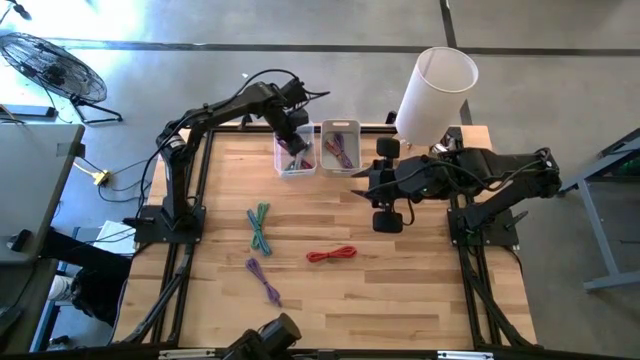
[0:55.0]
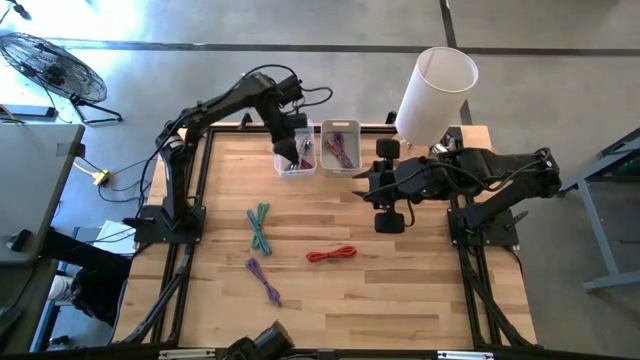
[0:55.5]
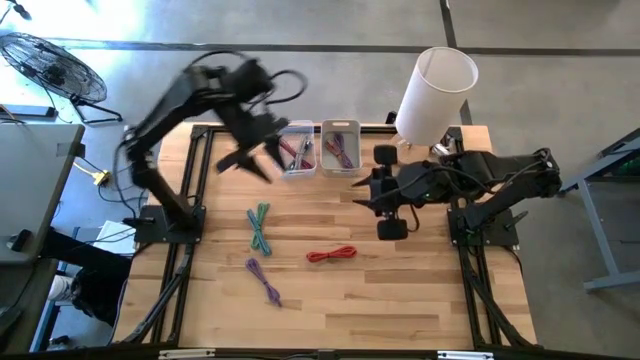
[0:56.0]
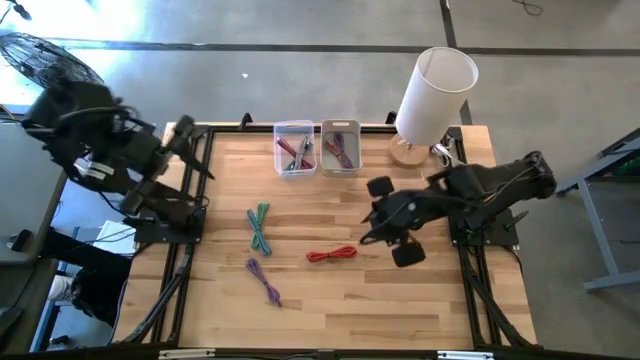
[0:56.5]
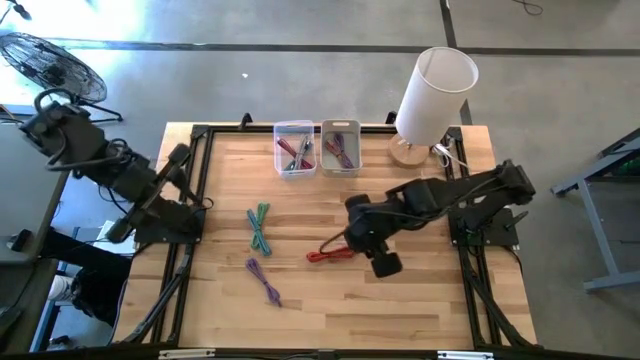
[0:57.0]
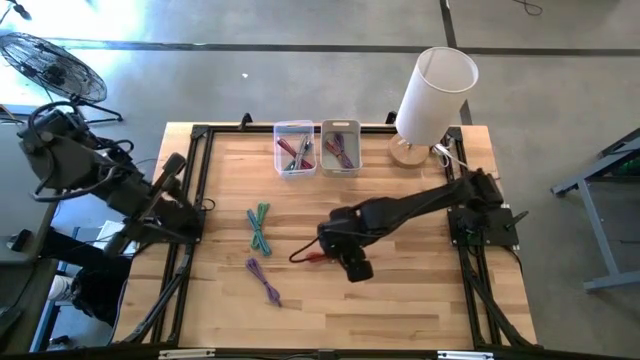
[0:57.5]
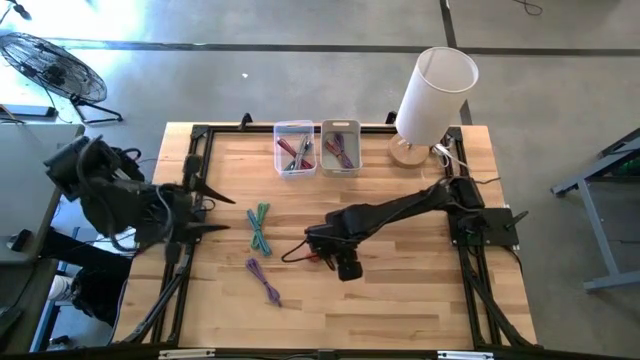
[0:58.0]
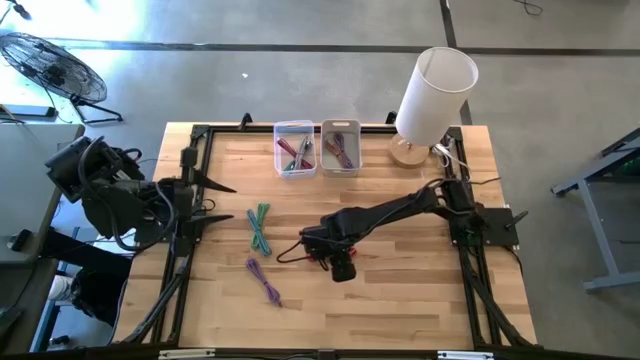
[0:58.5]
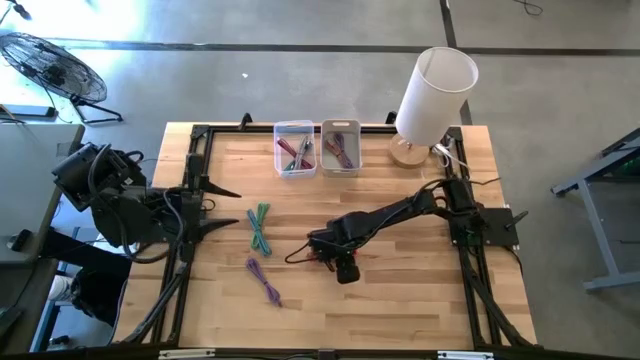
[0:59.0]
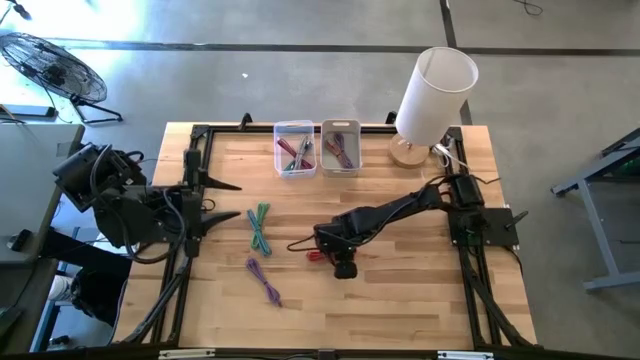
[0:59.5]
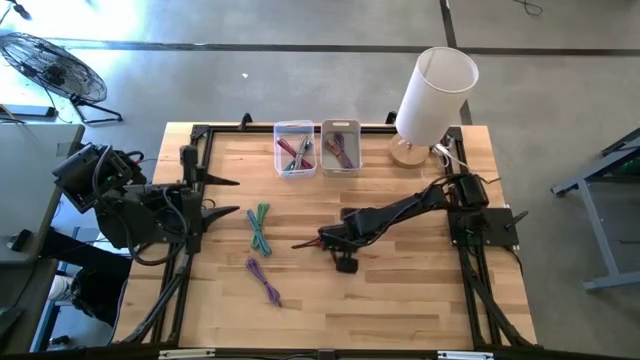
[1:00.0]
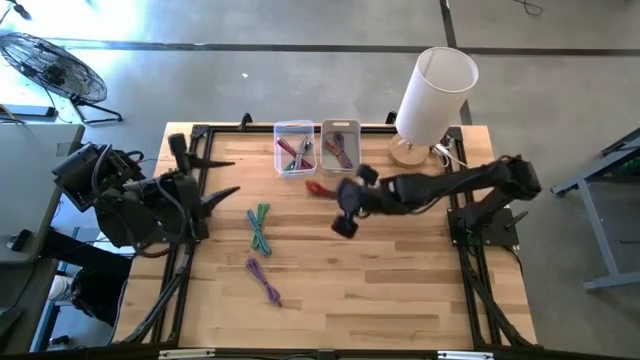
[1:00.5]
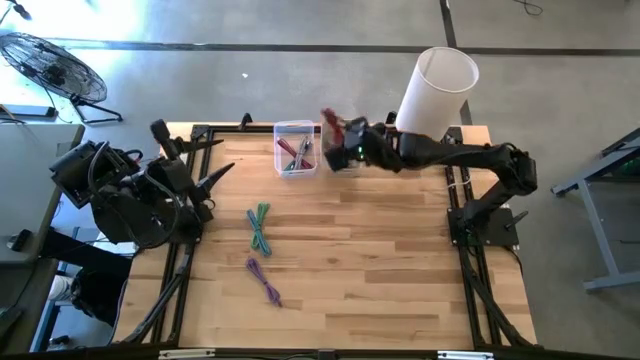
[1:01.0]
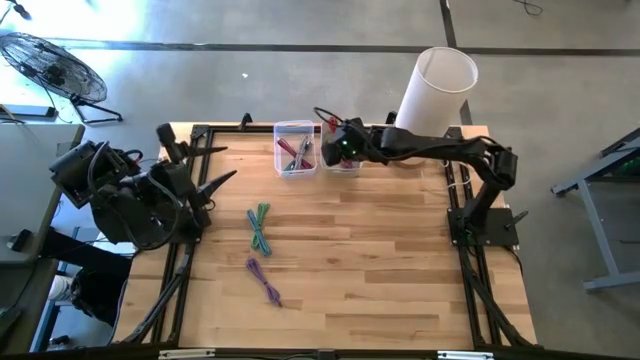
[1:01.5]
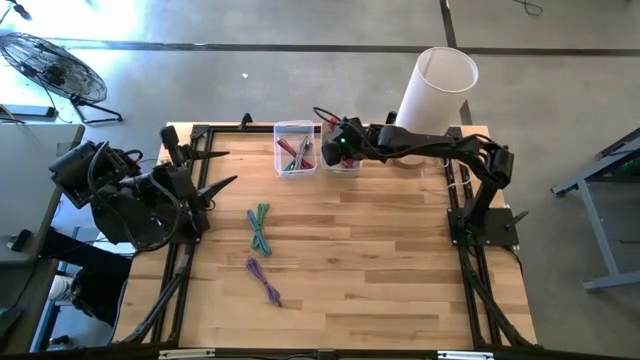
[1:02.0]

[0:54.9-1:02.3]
Task: Pick & Place USB Port
Put the orange charger cable into the gray bin

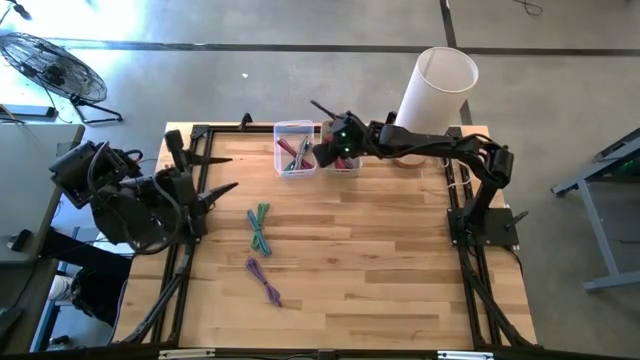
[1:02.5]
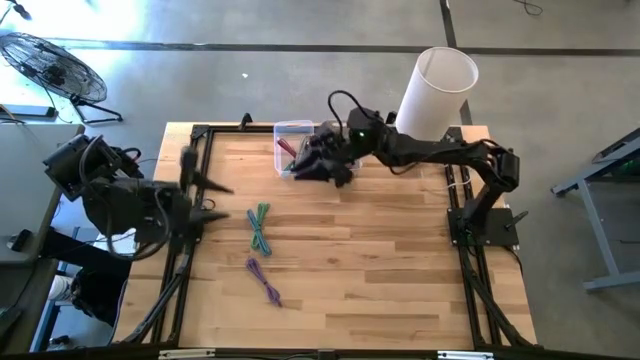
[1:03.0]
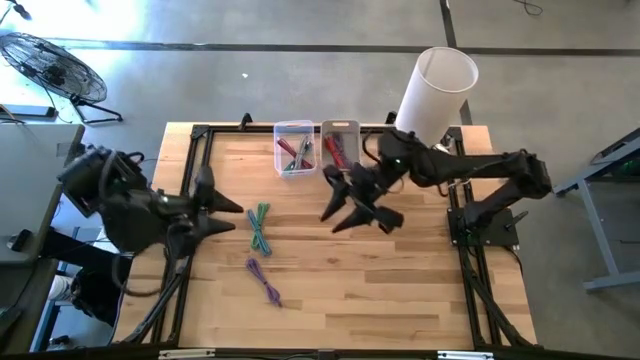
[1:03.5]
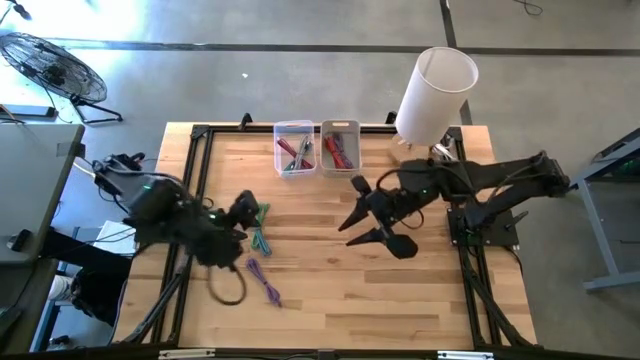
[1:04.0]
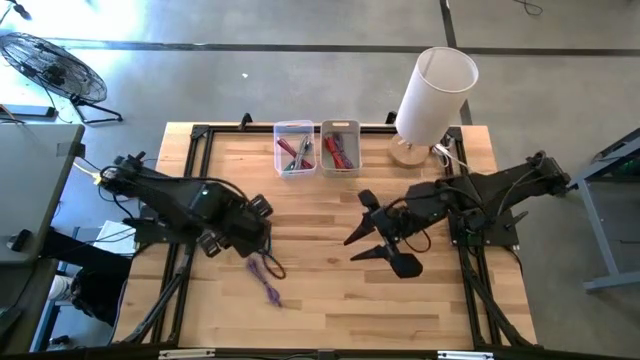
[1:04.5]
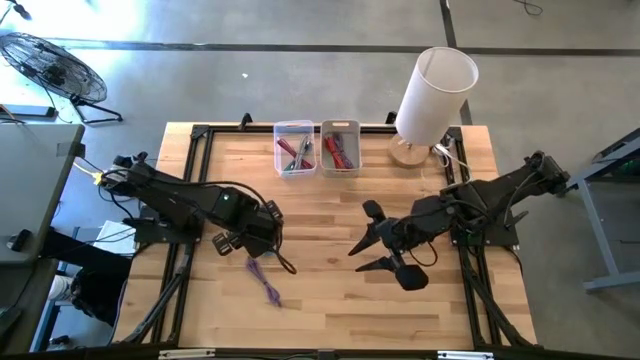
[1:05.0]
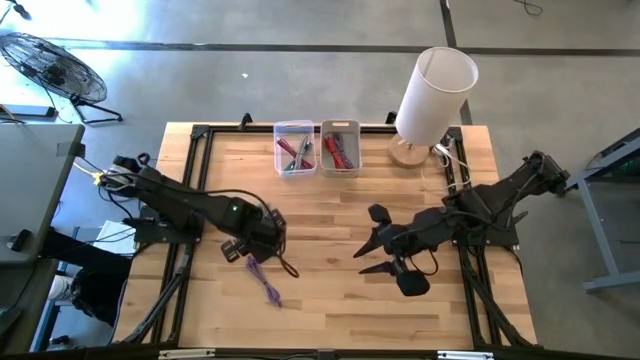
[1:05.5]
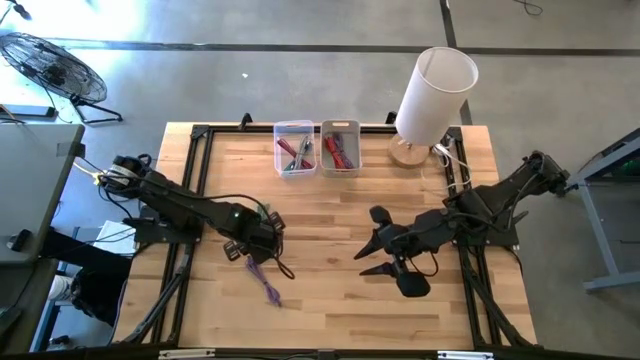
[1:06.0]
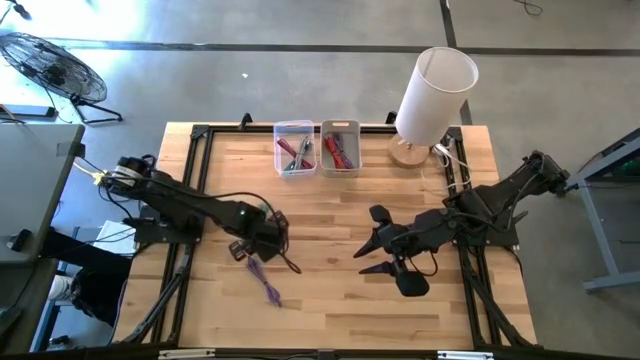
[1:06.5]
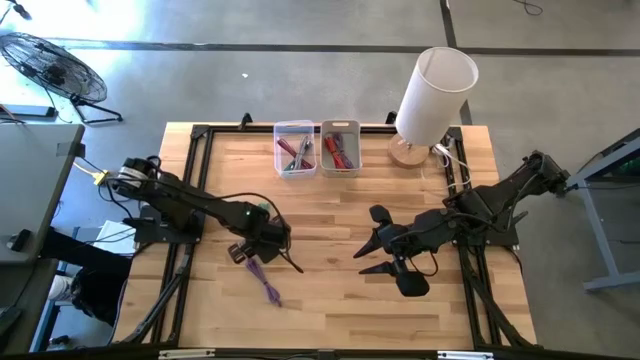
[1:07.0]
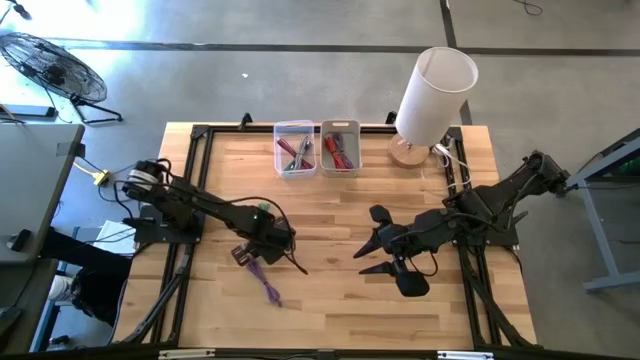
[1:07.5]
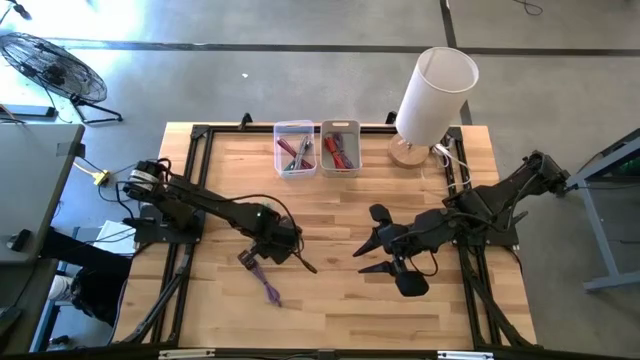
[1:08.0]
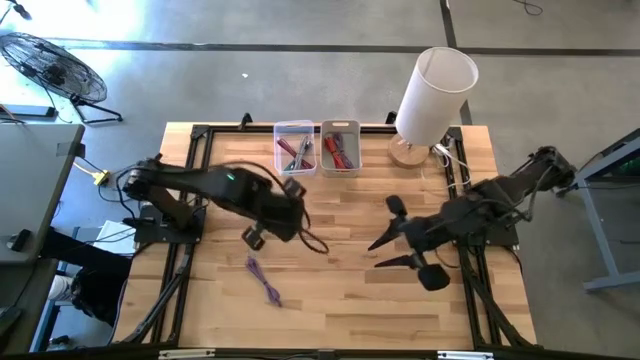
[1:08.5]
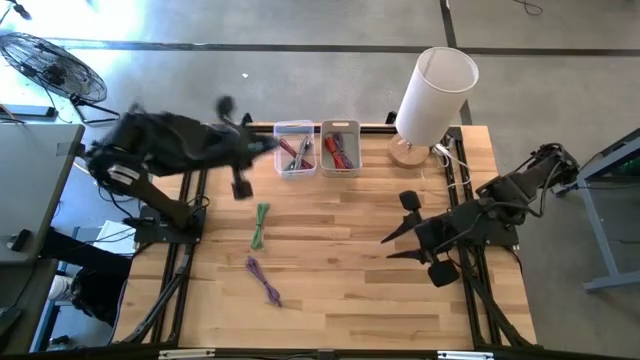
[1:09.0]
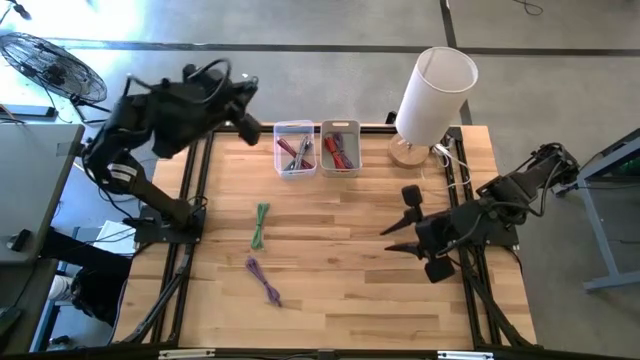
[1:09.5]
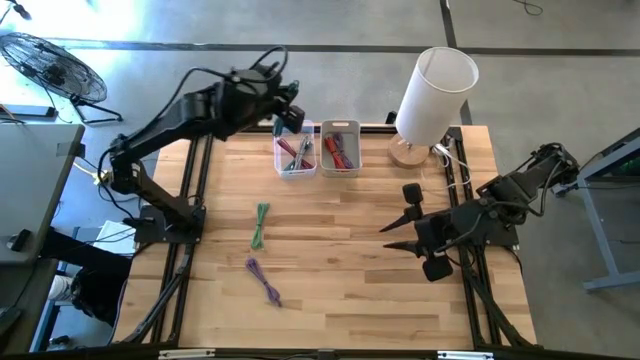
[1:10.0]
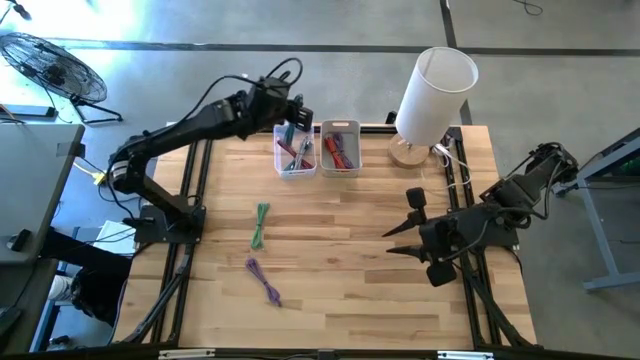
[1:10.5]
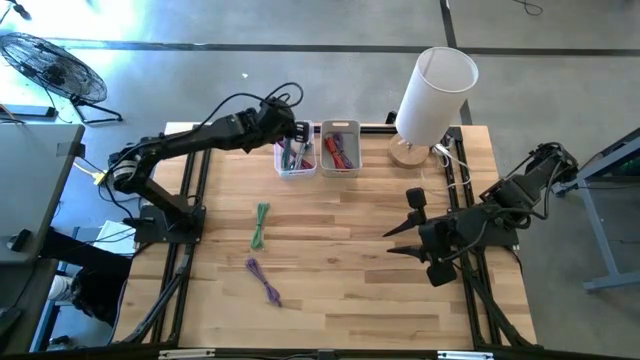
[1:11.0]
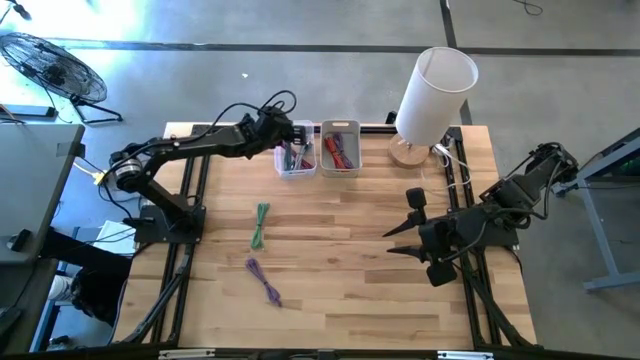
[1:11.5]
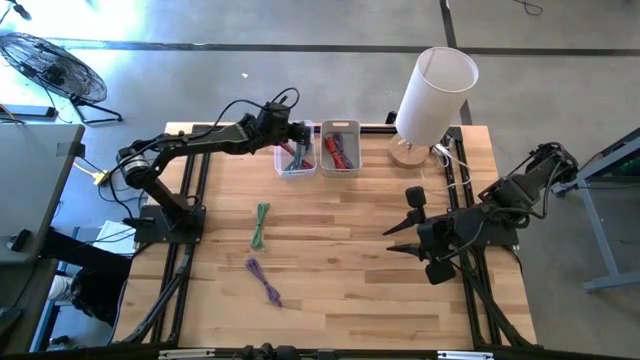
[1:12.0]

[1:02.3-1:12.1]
Put the blue patterned charger cable into the transparent bin

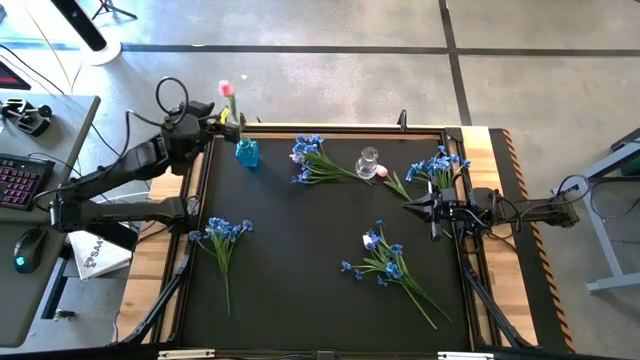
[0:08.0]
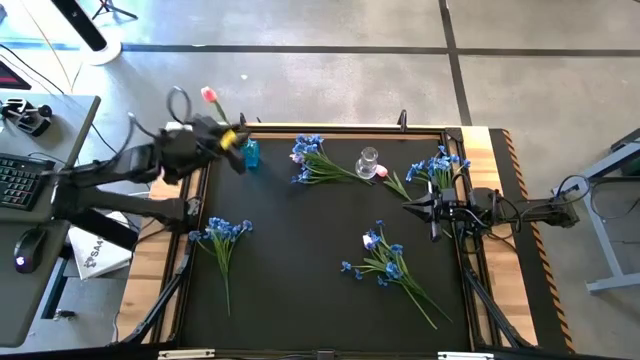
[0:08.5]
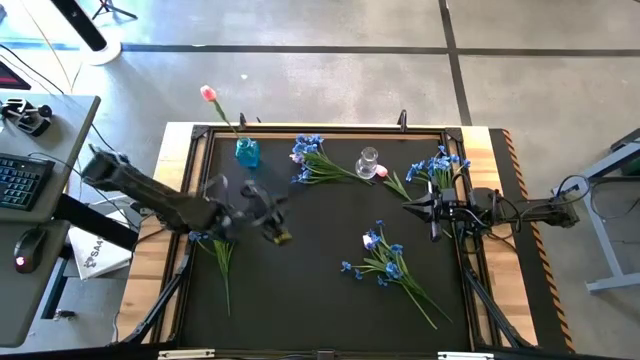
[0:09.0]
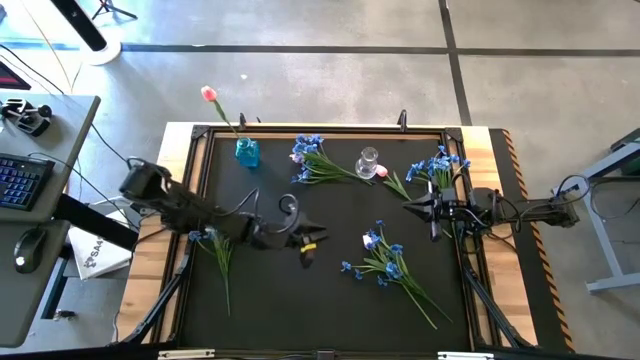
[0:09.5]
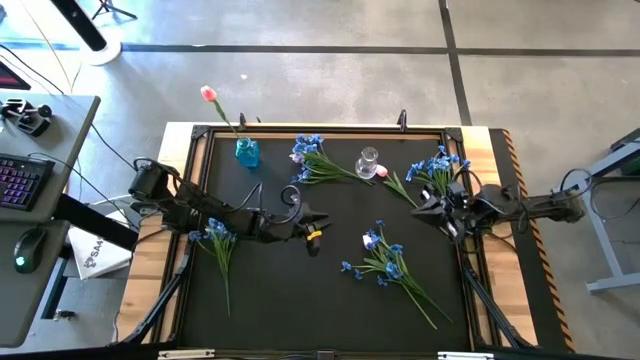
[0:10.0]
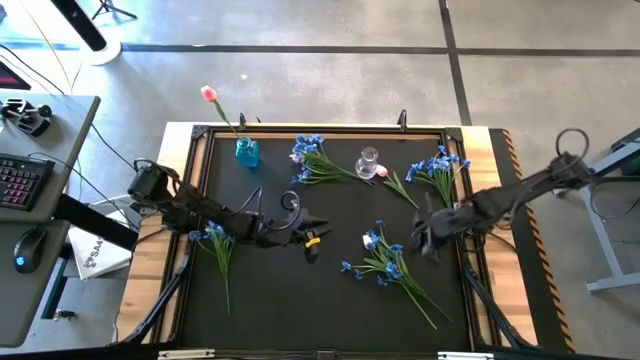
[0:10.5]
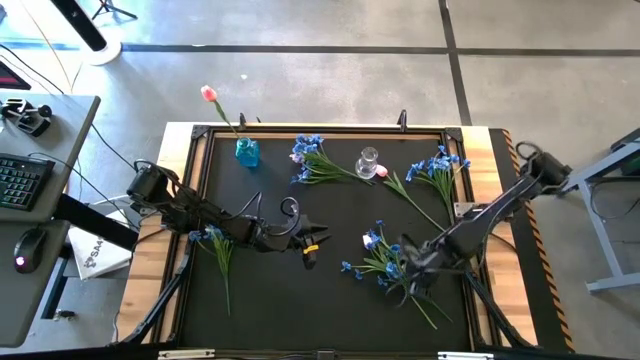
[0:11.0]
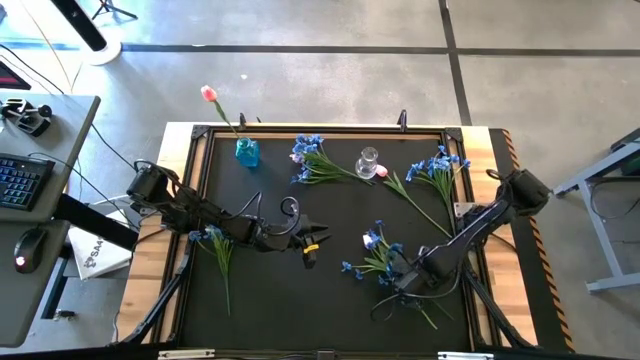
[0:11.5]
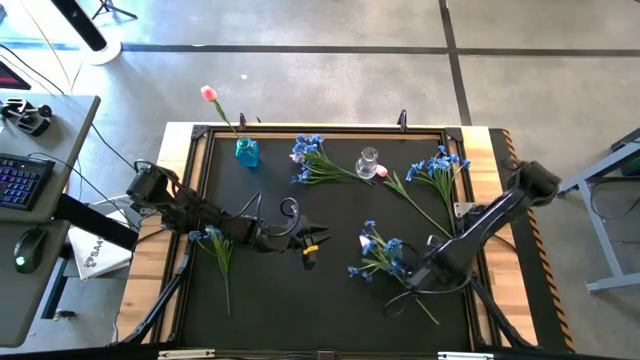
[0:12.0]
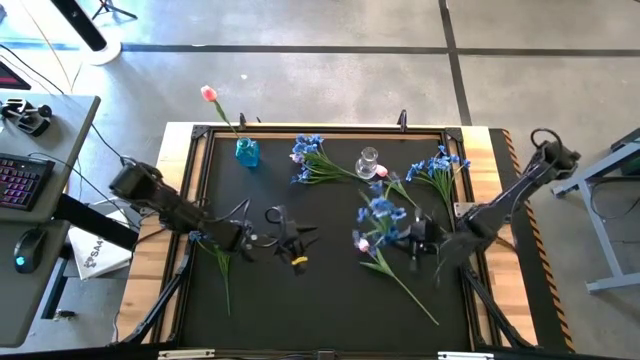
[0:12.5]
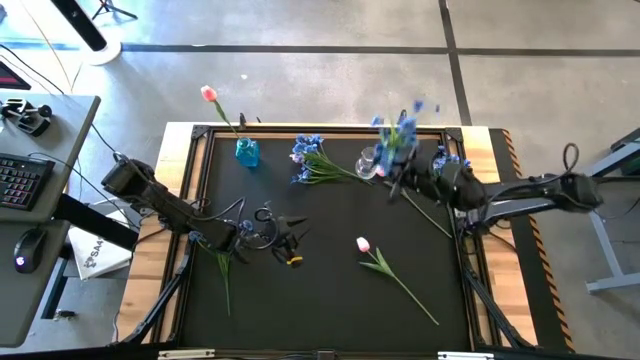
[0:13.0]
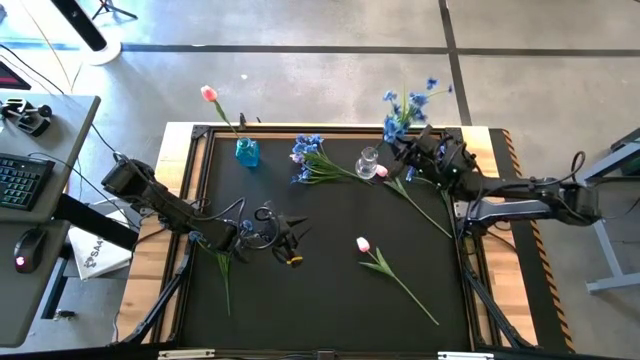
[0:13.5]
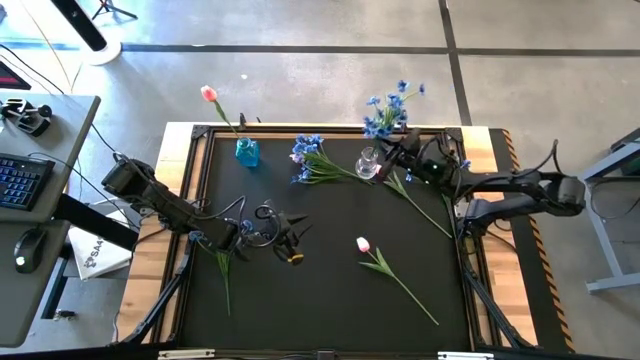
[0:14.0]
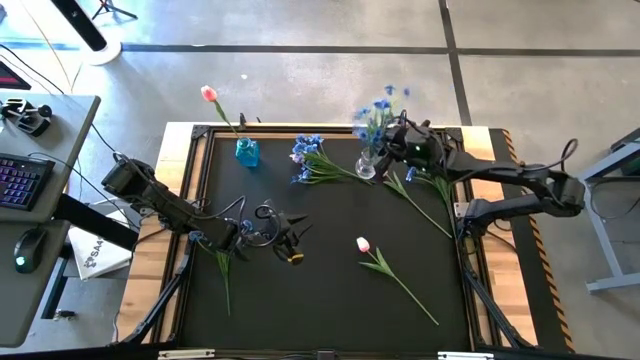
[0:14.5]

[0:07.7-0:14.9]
Task: Sort flowers into vase by color
Put the blue flowers into the transparent flower vase
